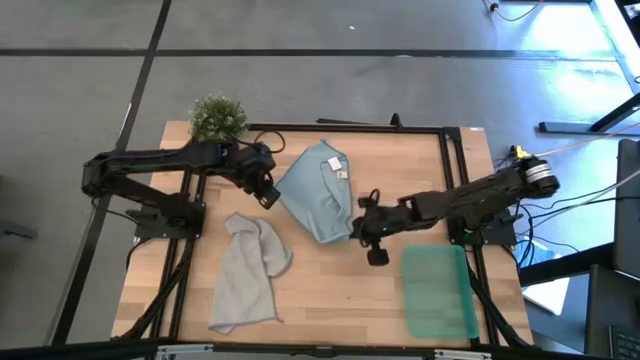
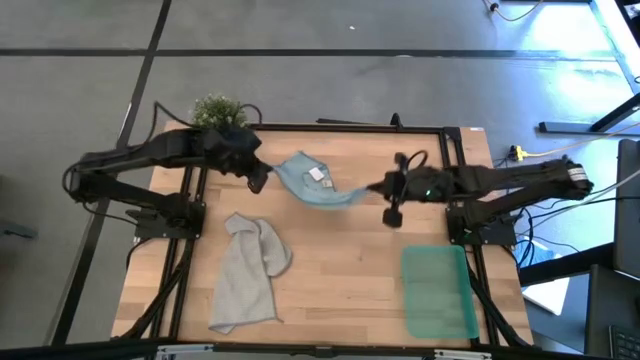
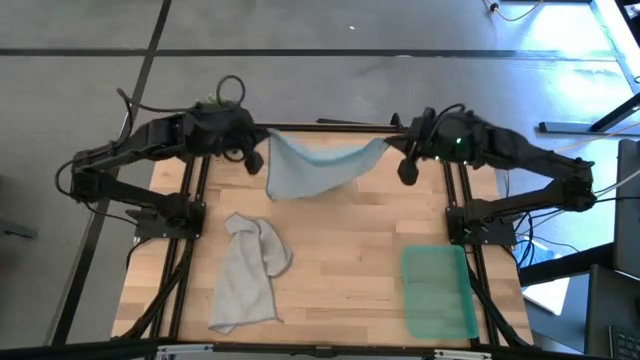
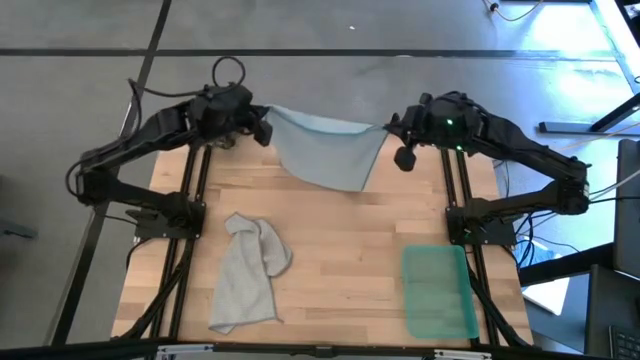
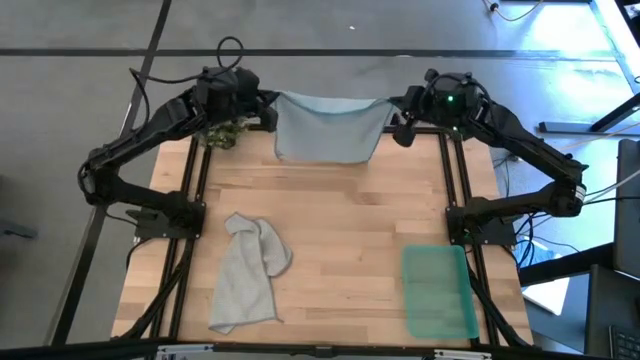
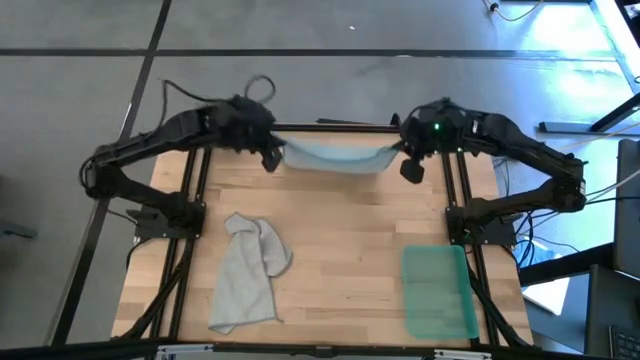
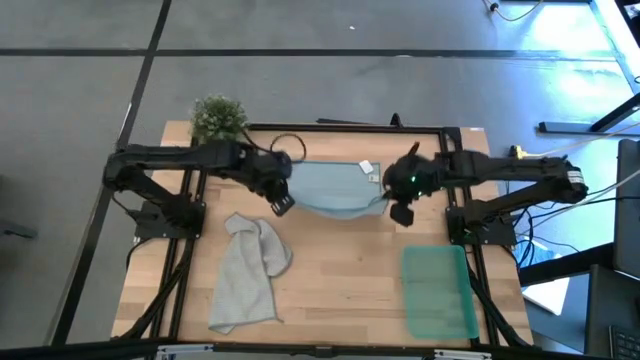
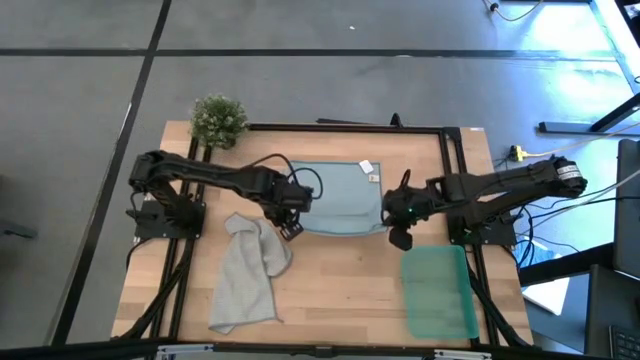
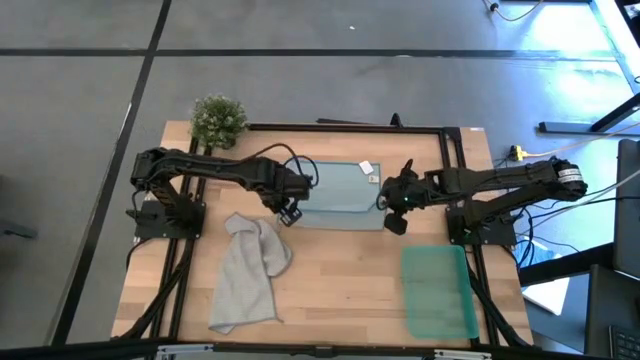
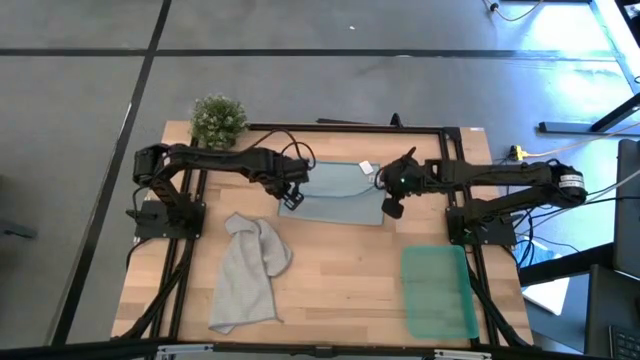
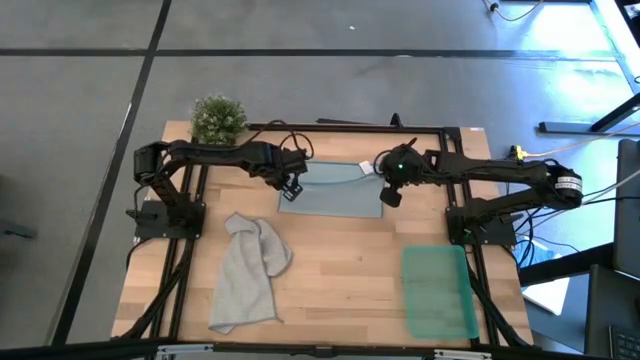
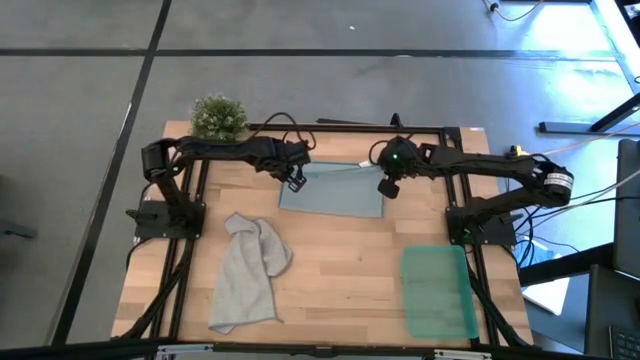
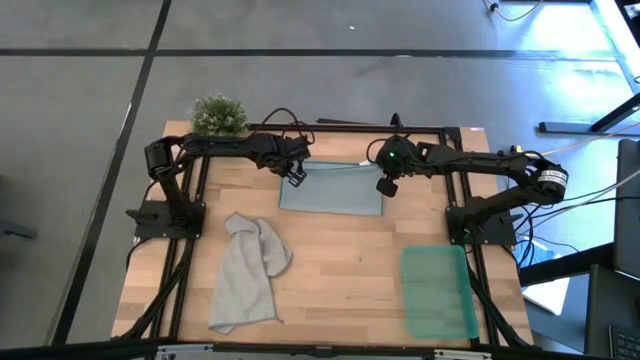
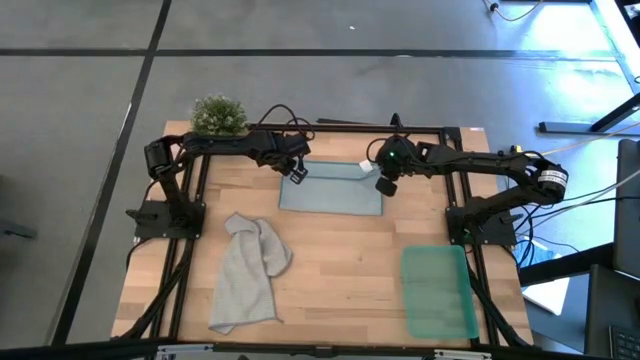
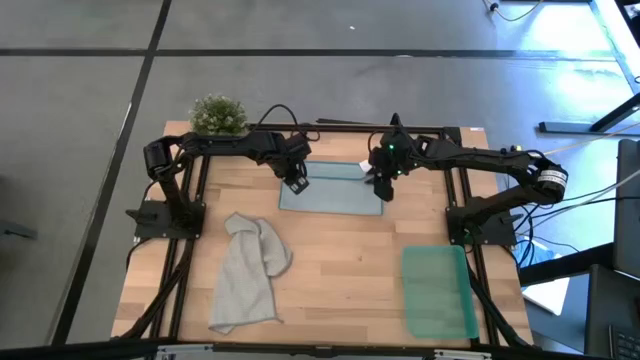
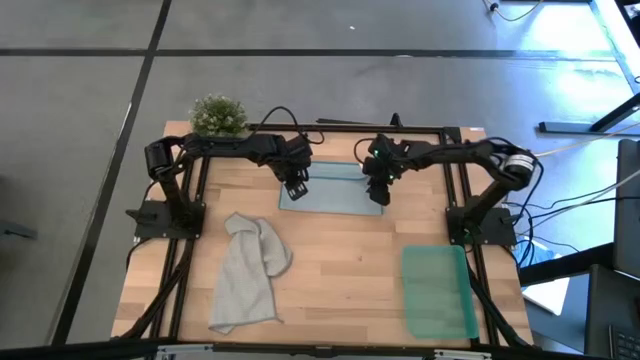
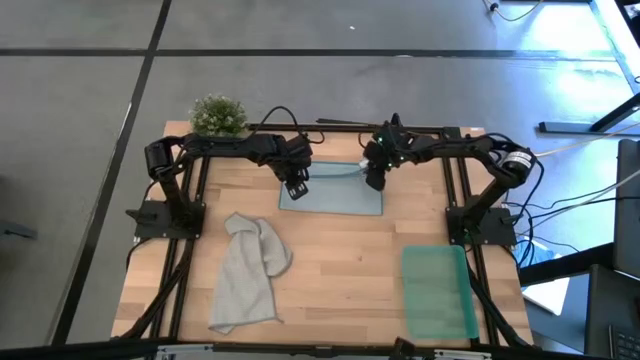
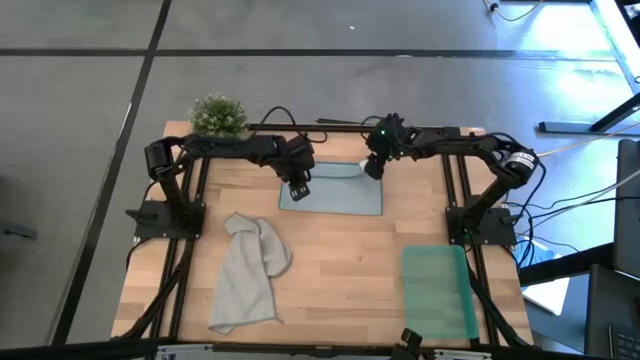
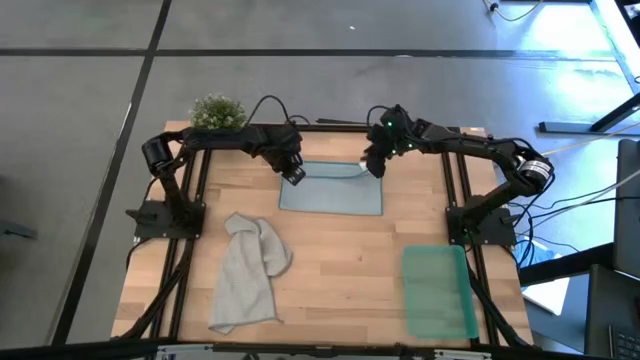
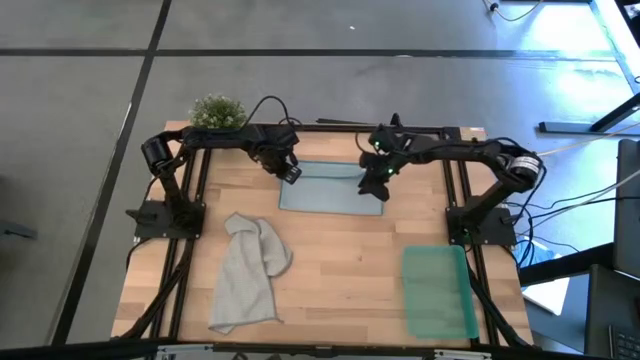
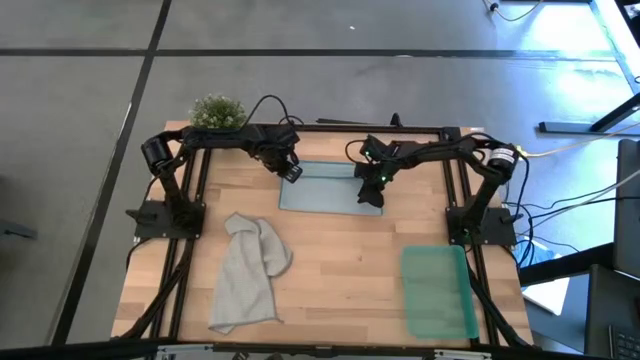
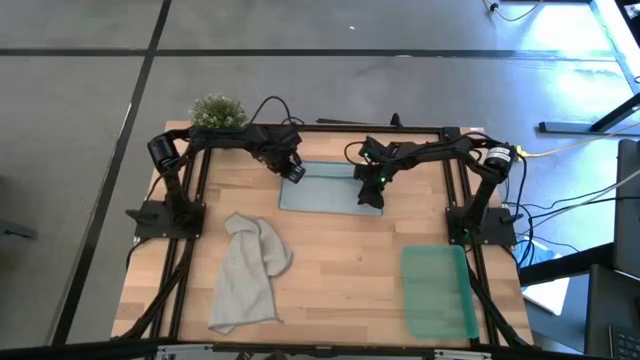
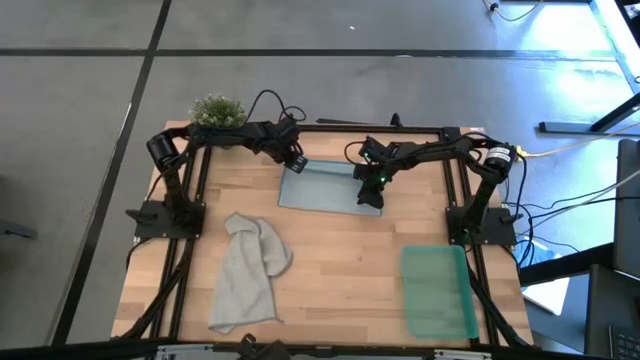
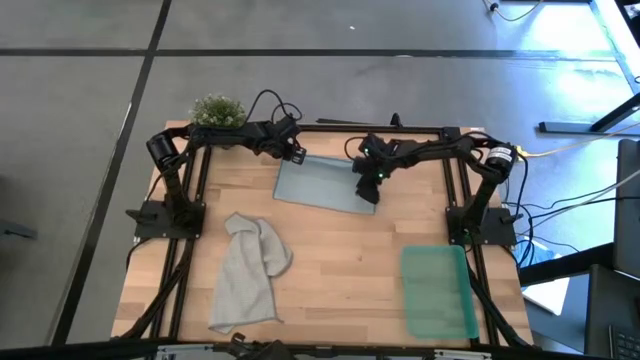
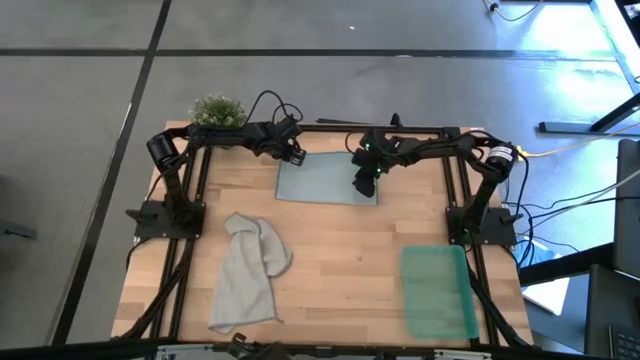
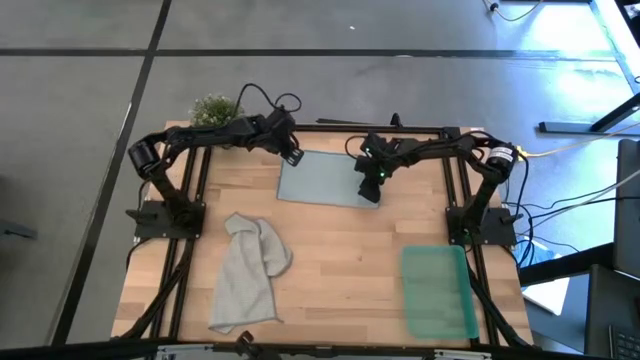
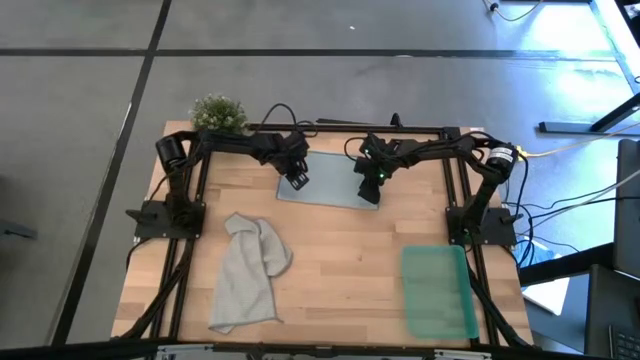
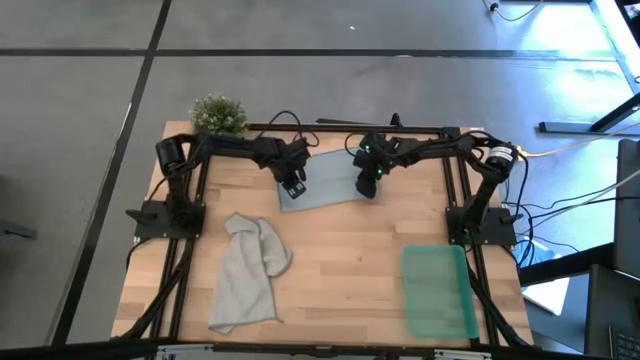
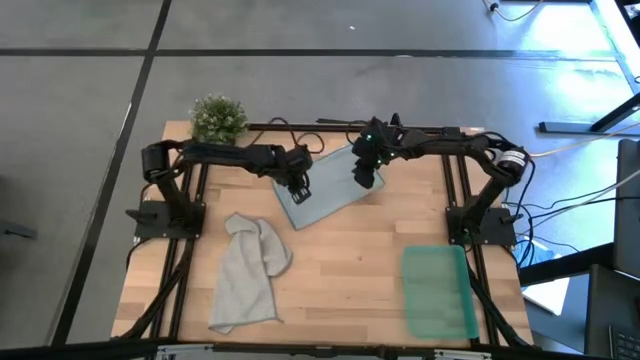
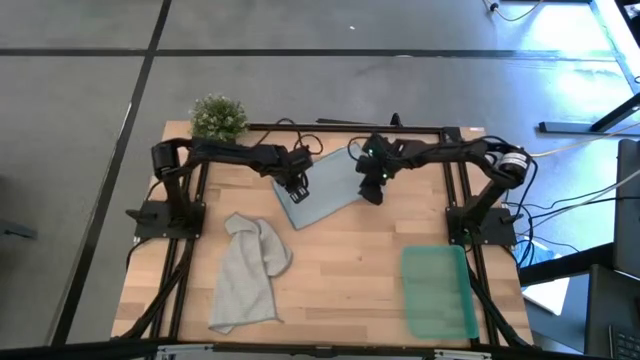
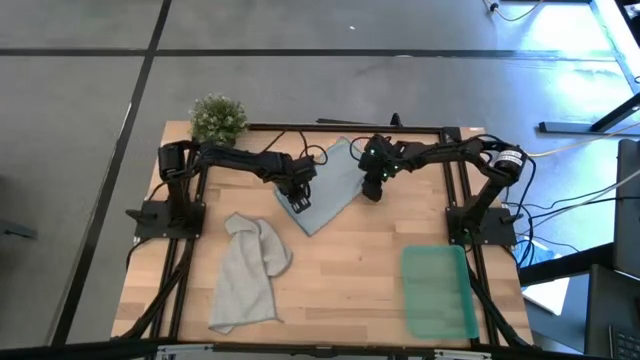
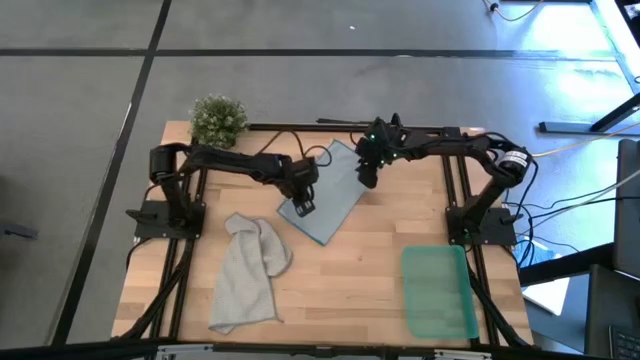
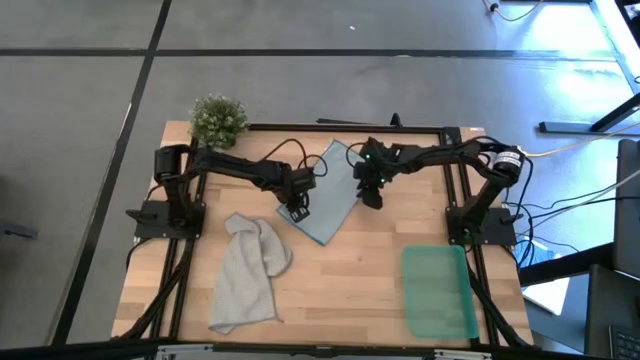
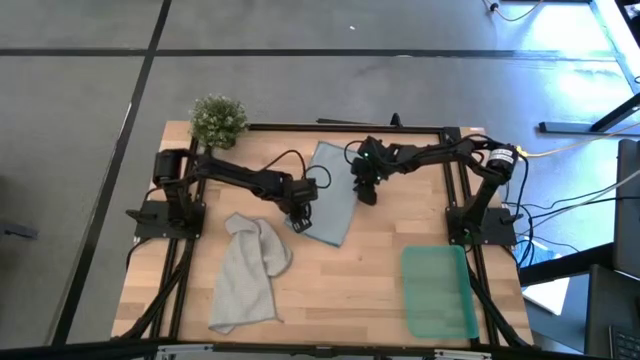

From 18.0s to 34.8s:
Task: Roll microfiber towels into tight, uniform cylinder then place into a basket
Fold the blue towel

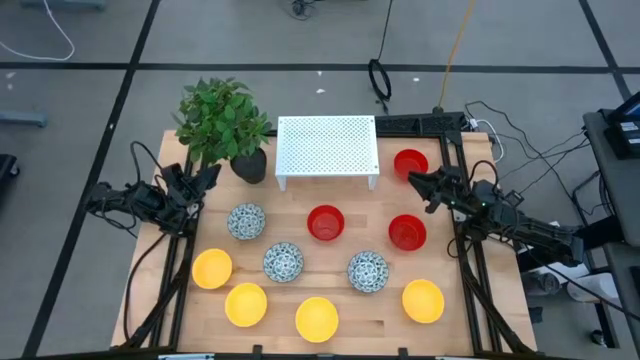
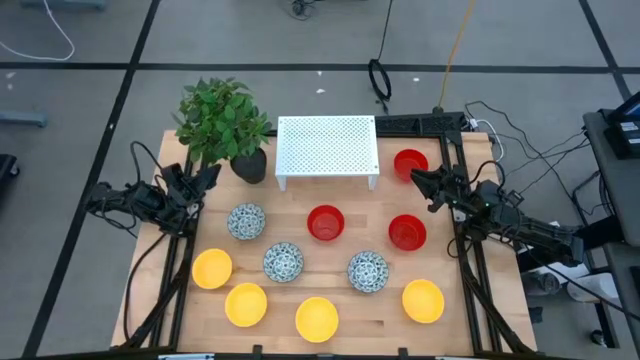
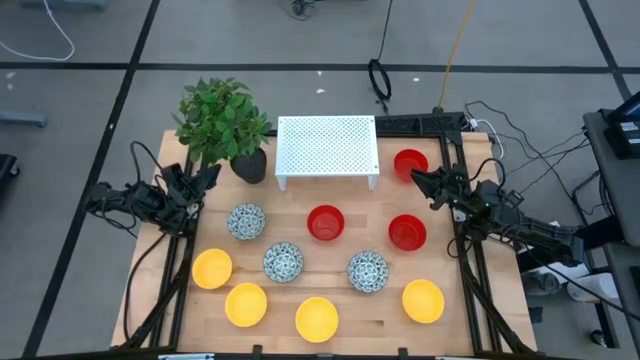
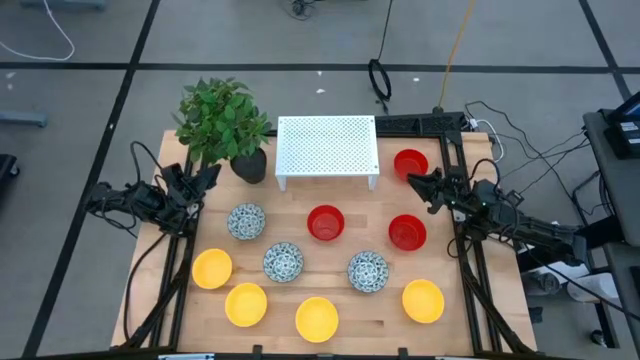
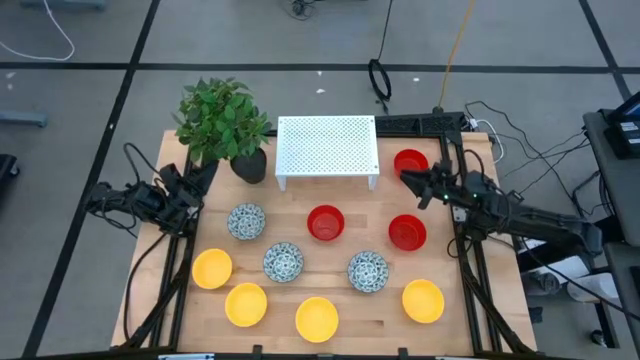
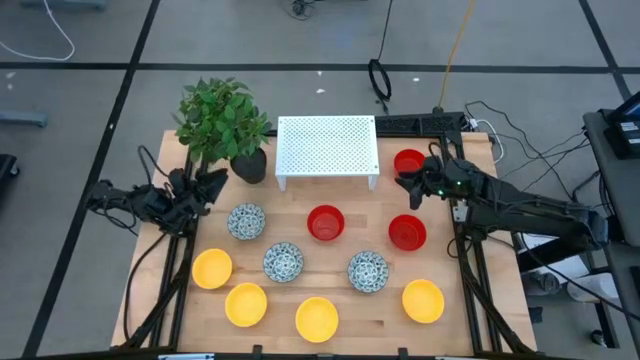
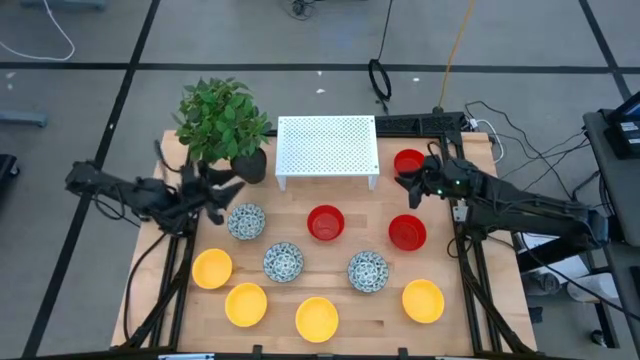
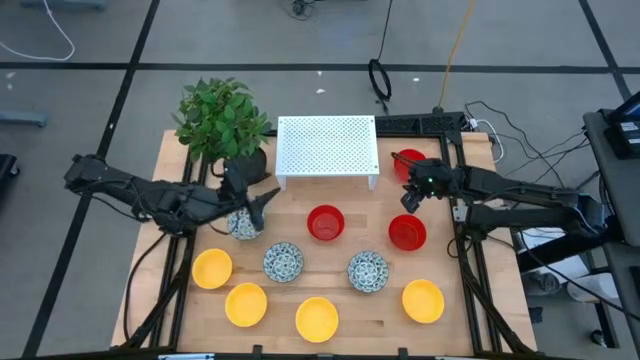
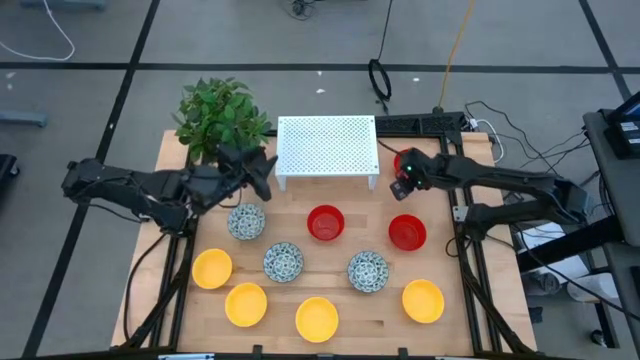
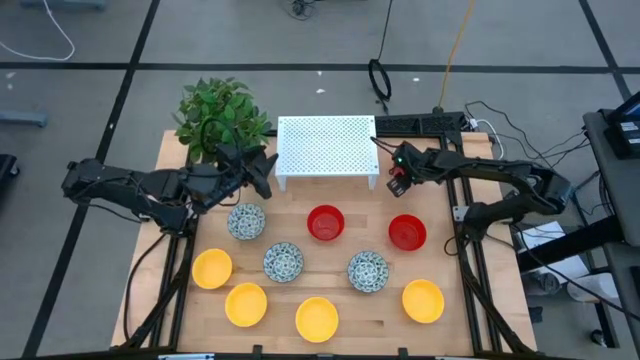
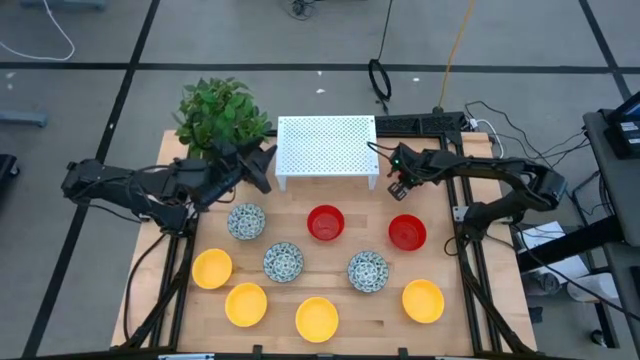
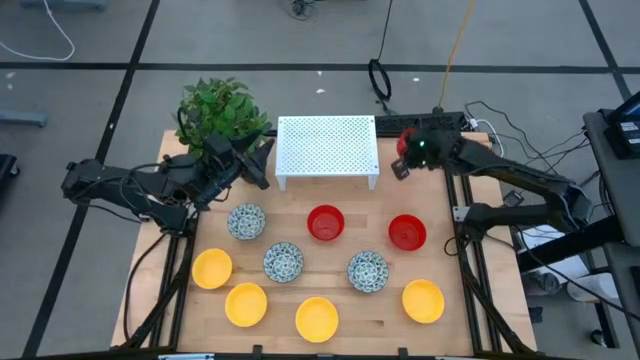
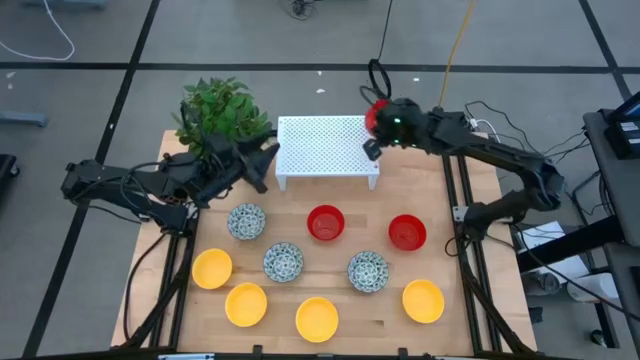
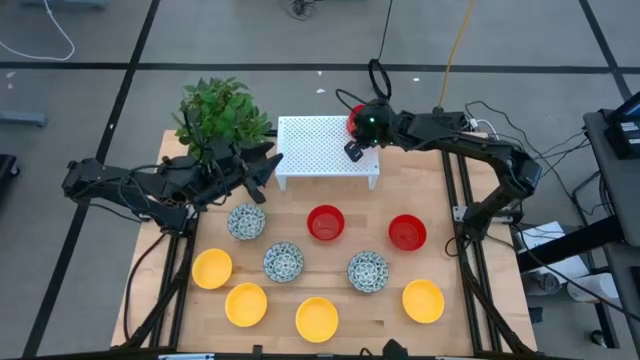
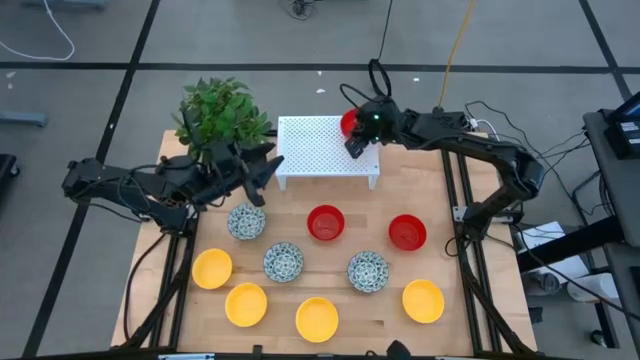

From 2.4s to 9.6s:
Task: Pick & Place Mini bowls
Put the red bowl on the shelf
